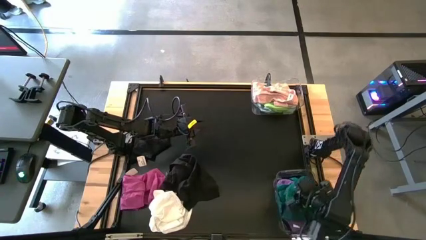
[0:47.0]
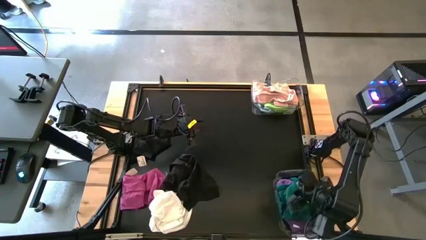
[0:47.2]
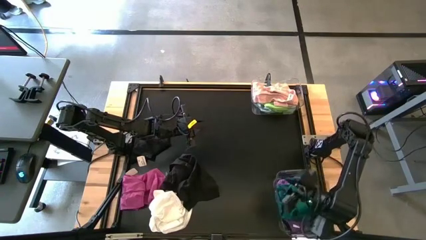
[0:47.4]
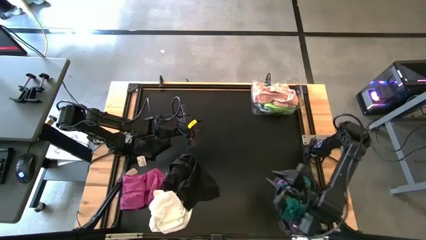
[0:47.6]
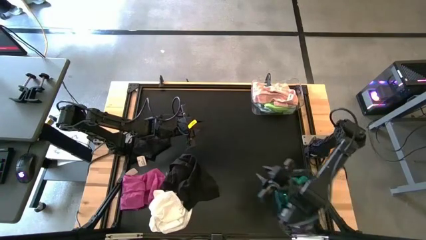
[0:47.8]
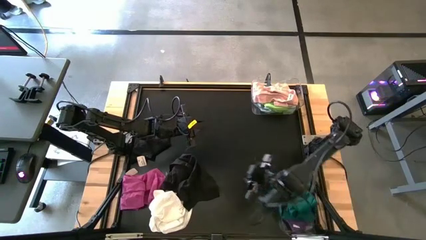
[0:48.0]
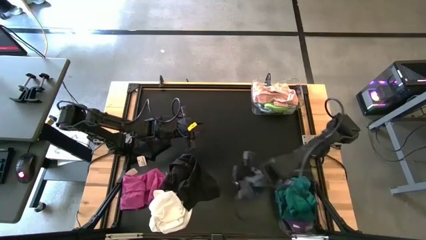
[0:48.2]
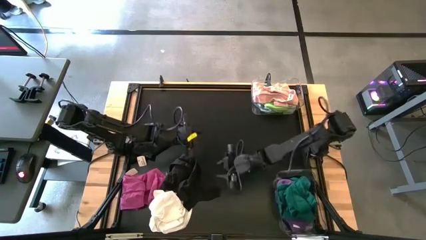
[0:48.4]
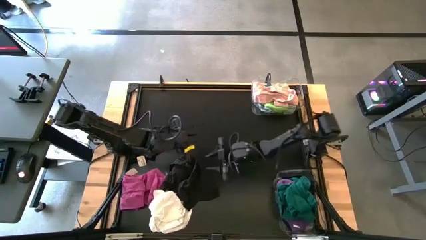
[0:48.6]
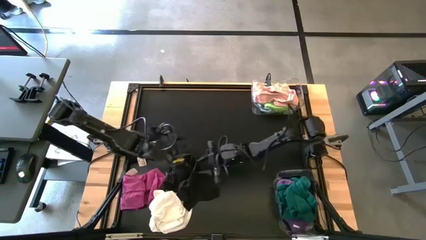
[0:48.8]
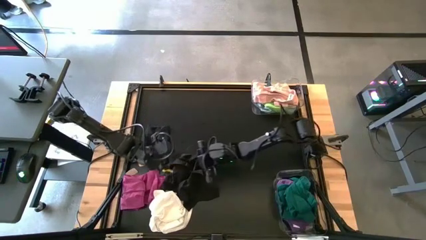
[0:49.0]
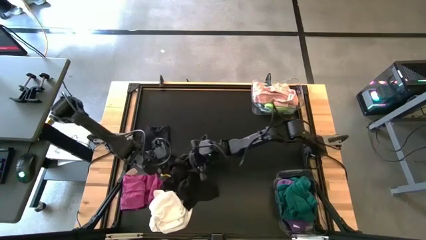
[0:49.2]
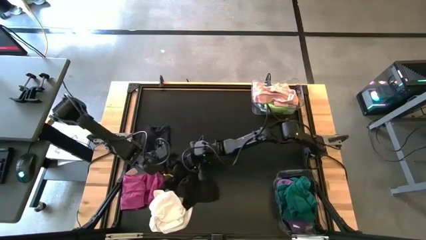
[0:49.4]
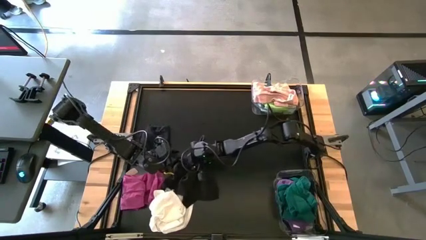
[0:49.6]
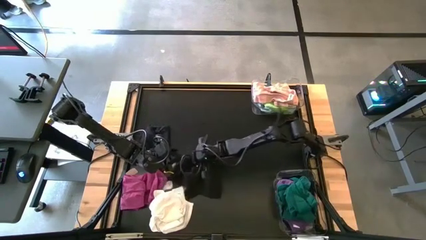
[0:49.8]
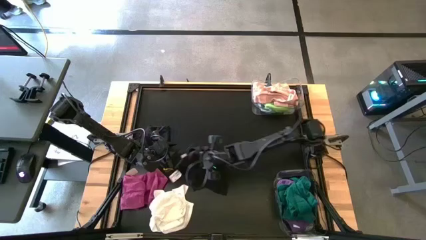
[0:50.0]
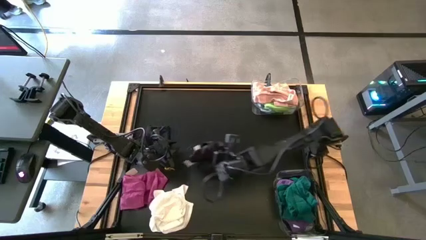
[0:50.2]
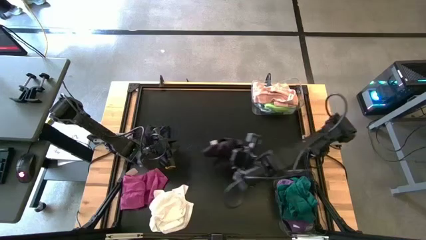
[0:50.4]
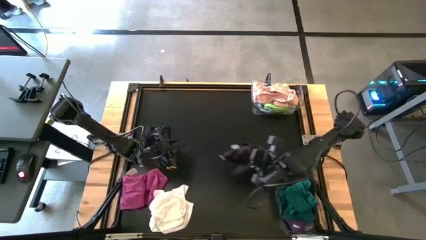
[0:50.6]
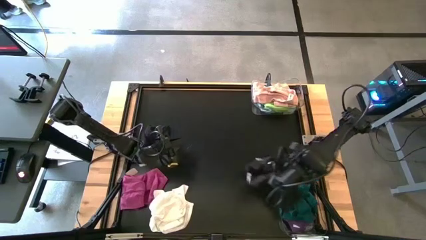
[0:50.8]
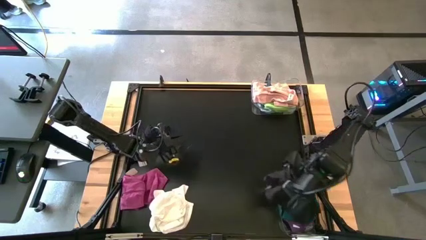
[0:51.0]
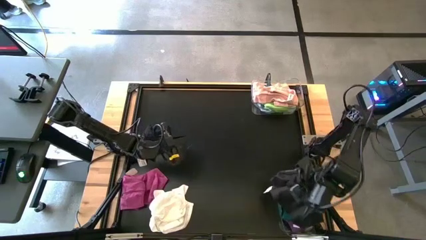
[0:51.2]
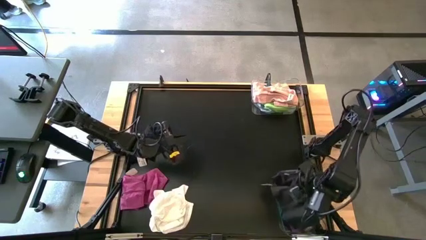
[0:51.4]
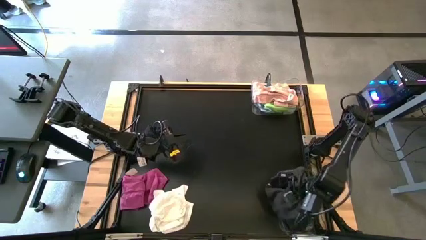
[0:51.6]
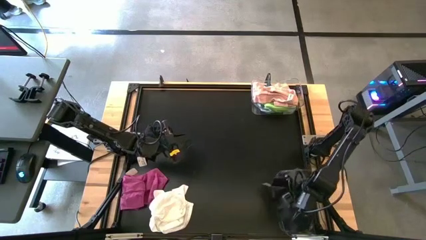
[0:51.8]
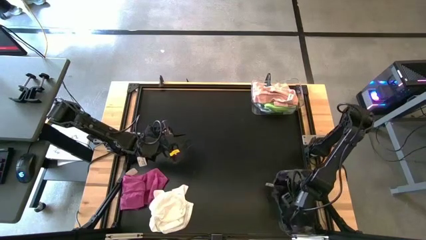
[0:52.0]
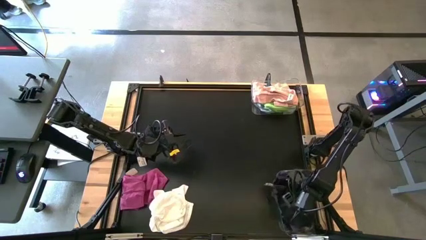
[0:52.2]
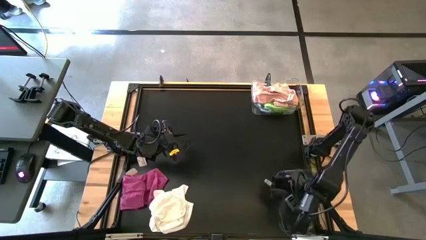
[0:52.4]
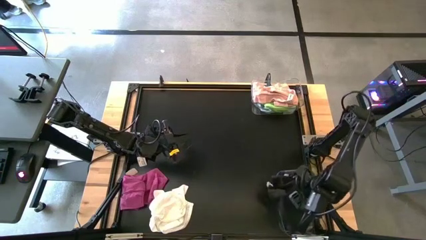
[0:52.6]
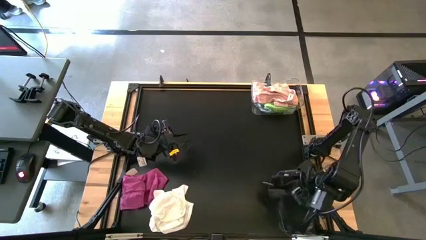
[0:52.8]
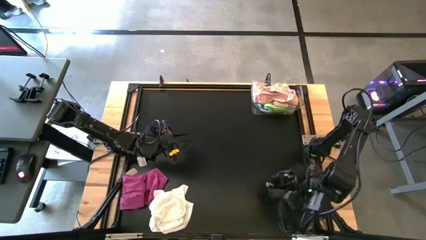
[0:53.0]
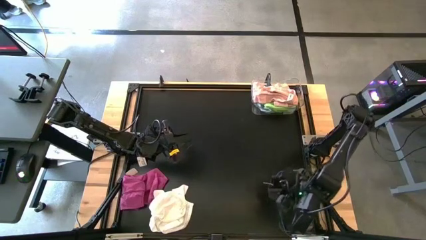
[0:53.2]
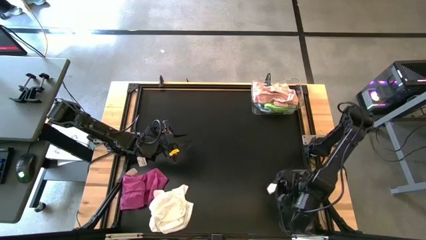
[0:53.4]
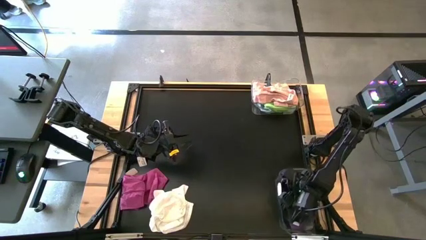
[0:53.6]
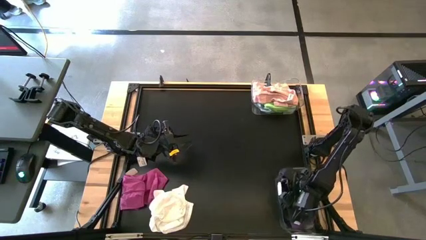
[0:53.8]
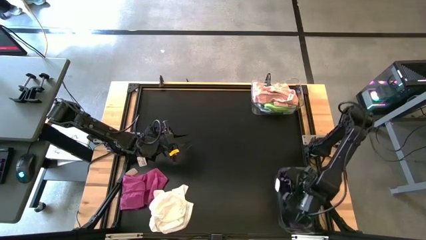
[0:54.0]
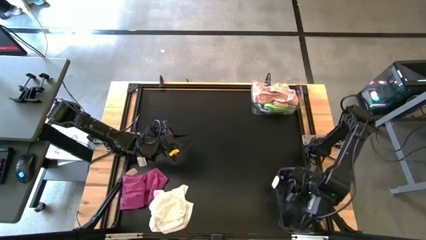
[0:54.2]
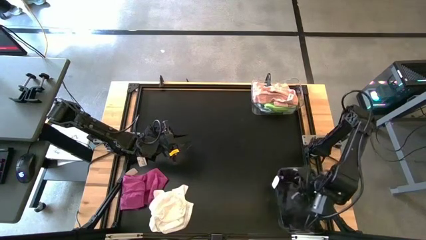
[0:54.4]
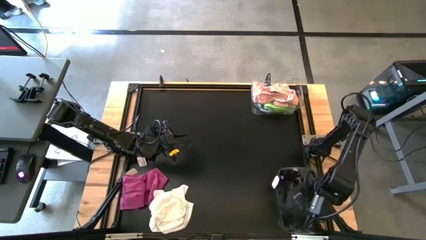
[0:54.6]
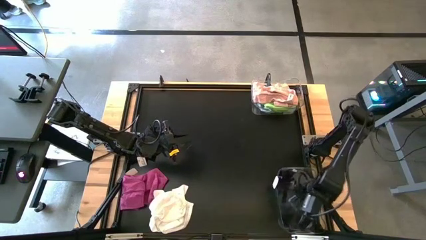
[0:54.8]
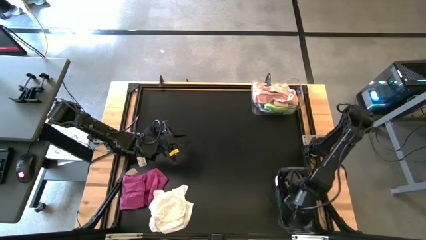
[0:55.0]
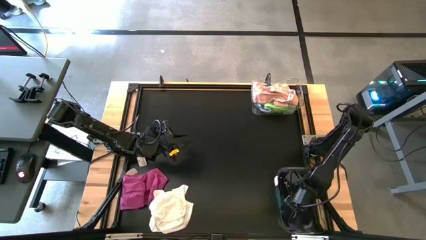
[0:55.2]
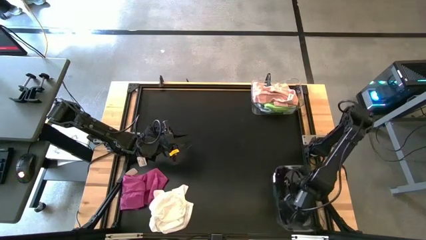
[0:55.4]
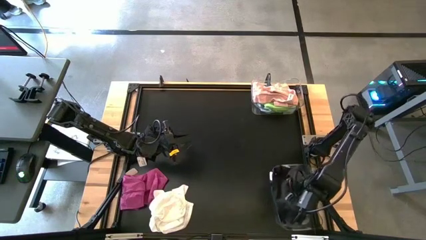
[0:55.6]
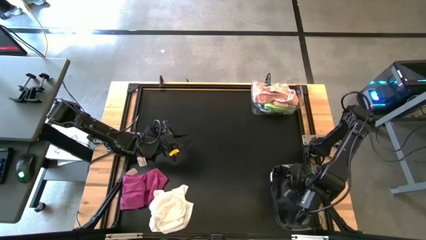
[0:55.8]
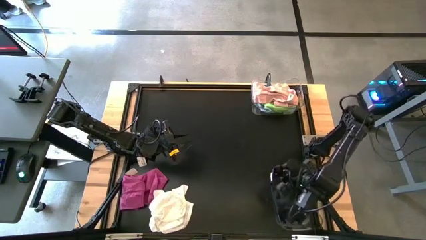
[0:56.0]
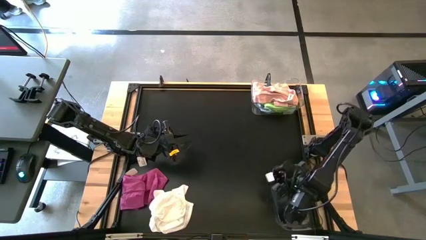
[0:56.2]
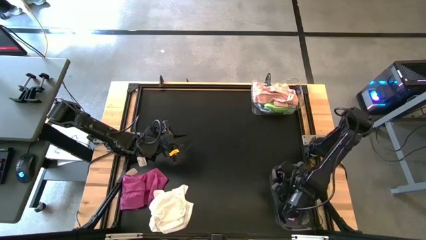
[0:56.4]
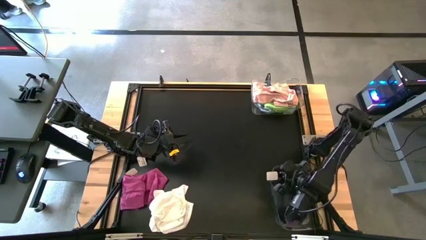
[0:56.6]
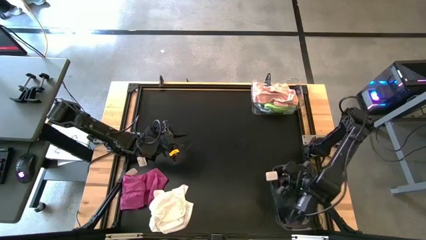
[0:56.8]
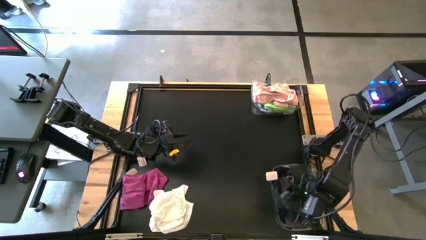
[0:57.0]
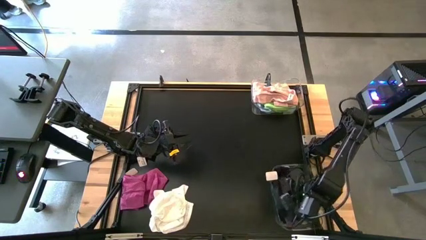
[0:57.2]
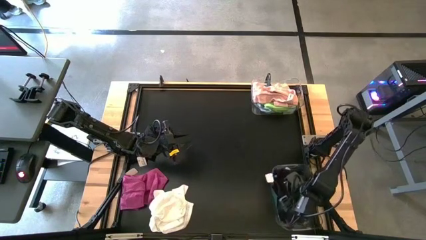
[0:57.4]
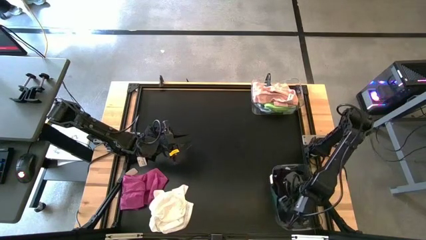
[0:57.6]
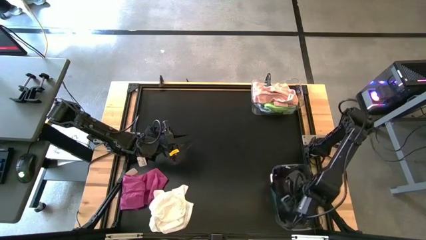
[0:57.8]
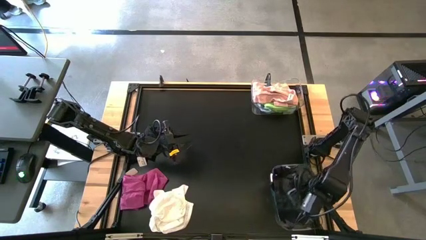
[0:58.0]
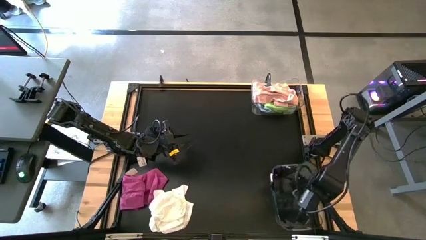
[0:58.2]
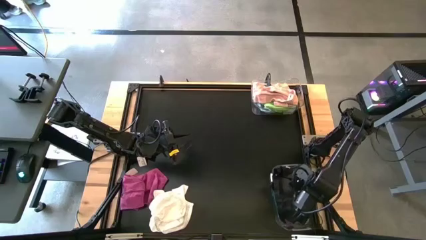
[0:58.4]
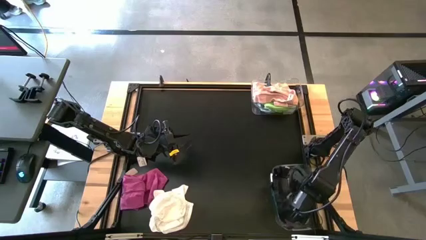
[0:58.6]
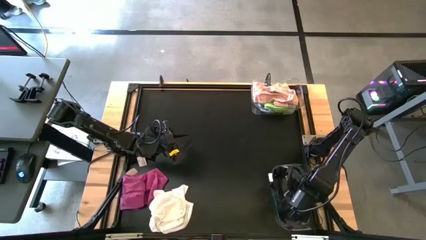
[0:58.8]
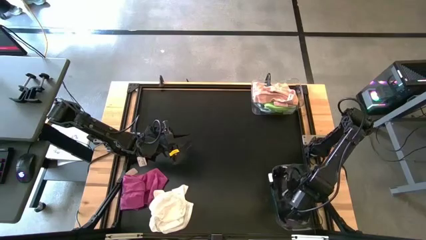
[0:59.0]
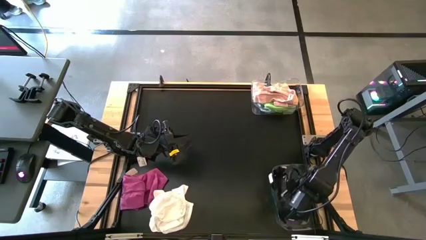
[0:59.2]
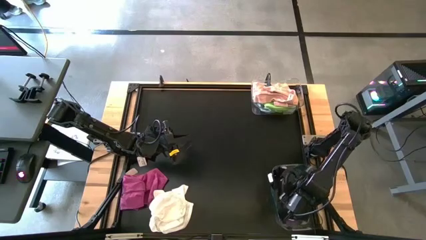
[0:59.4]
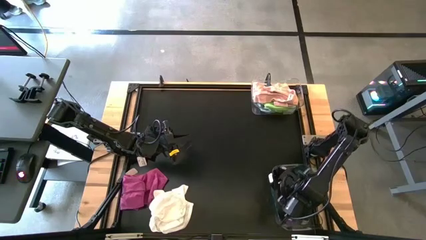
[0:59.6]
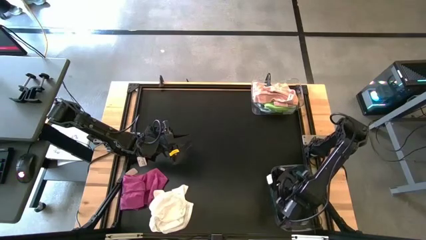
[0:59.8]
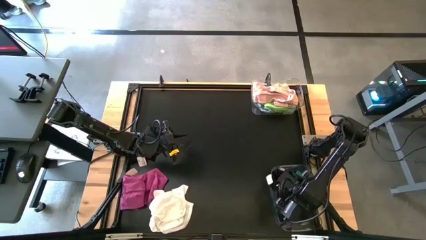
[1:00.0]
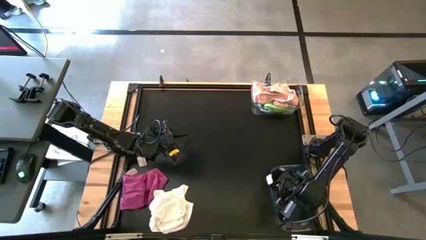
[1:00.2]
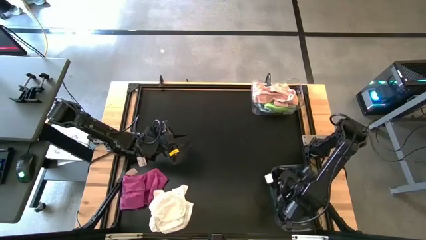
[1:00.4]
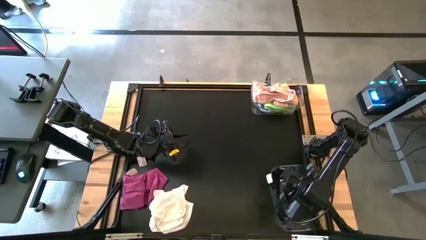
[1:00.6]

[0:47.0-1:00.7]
Task: Sort towels by color in basket
Put the bottom black towel into the bottom transparent bin
